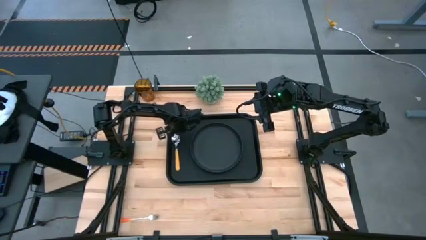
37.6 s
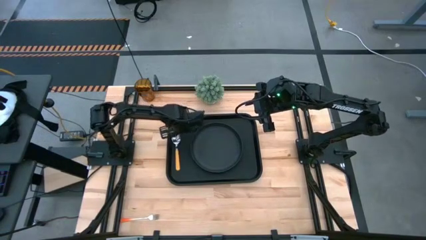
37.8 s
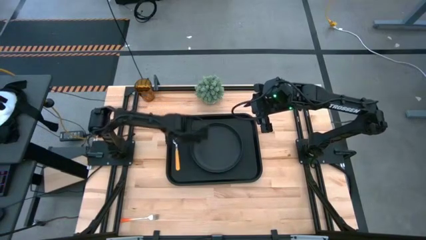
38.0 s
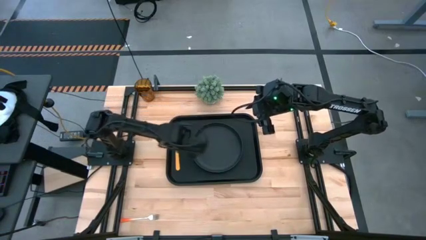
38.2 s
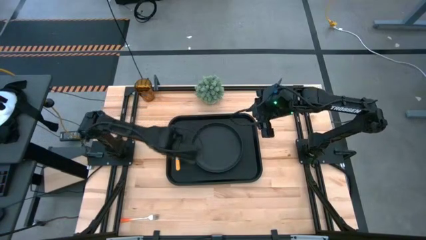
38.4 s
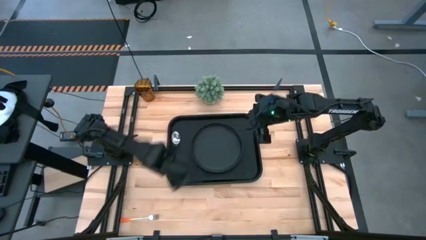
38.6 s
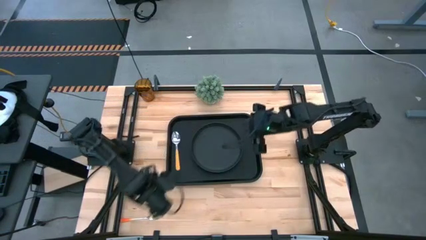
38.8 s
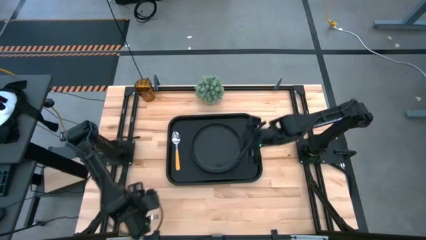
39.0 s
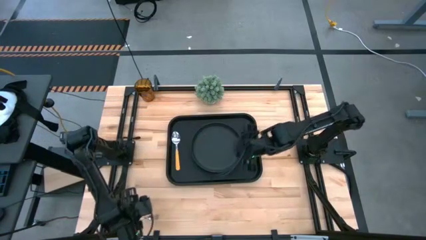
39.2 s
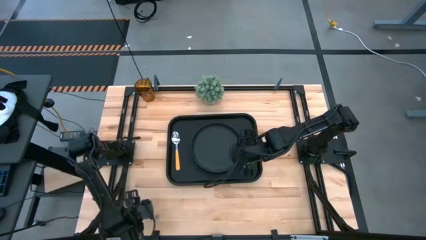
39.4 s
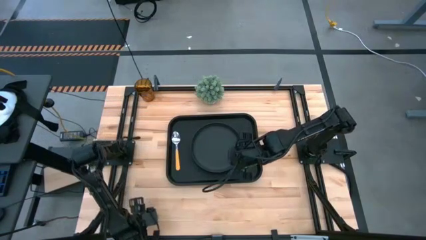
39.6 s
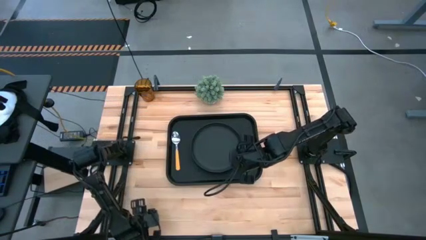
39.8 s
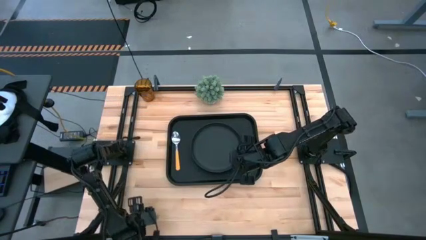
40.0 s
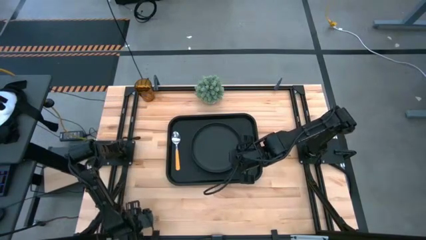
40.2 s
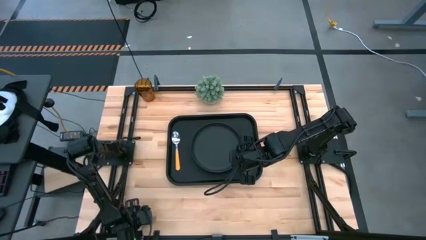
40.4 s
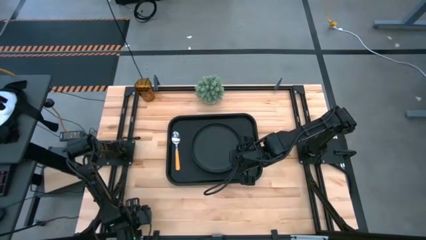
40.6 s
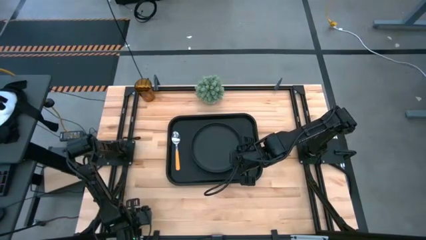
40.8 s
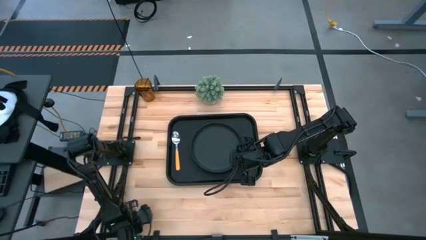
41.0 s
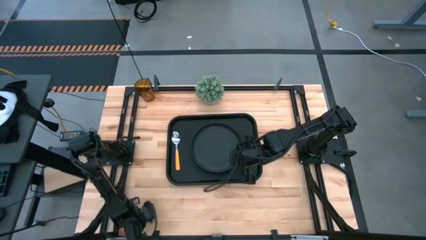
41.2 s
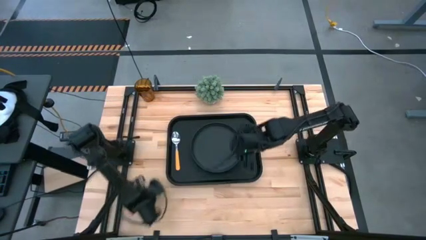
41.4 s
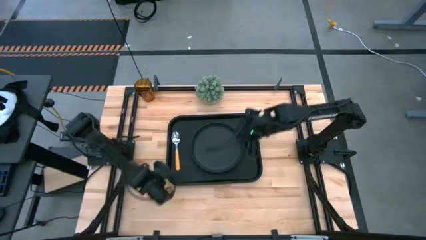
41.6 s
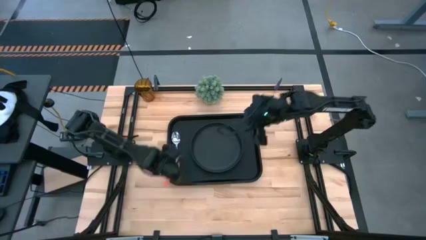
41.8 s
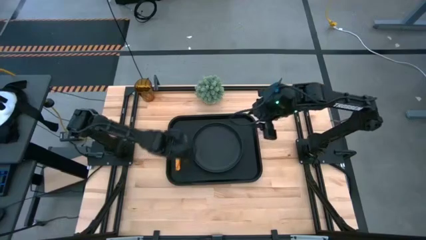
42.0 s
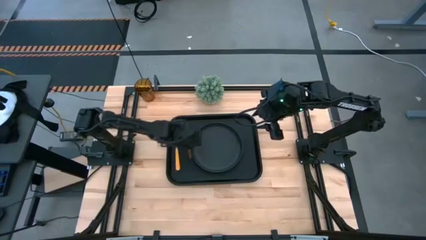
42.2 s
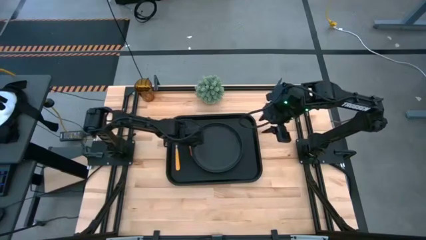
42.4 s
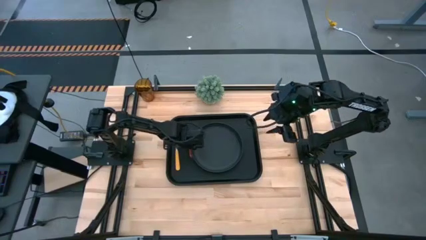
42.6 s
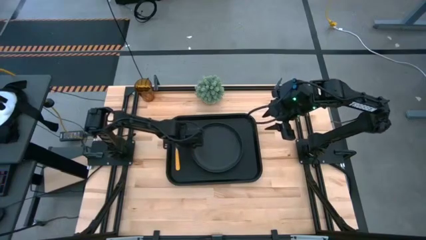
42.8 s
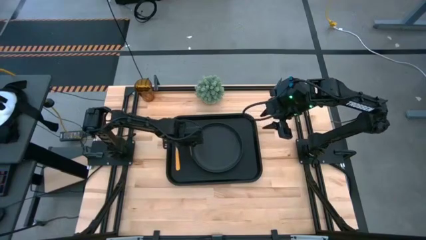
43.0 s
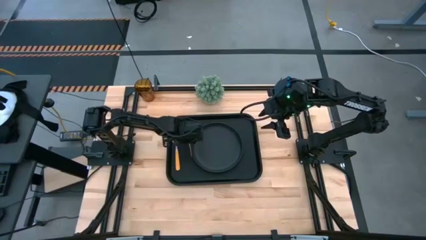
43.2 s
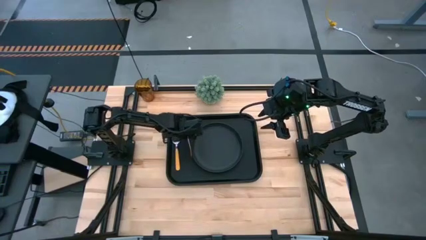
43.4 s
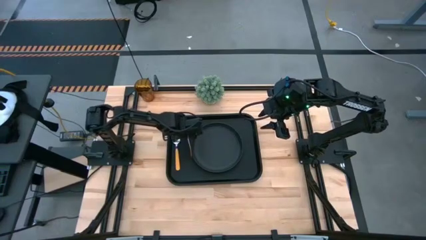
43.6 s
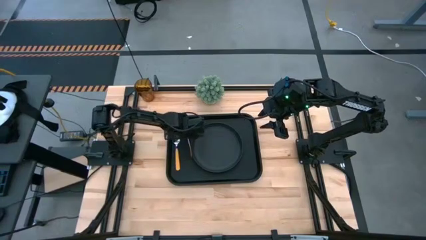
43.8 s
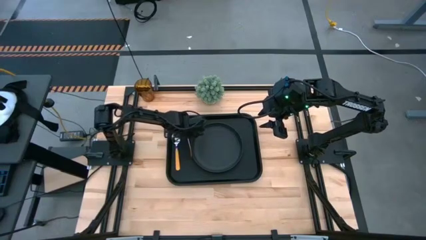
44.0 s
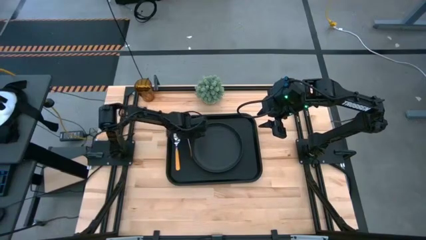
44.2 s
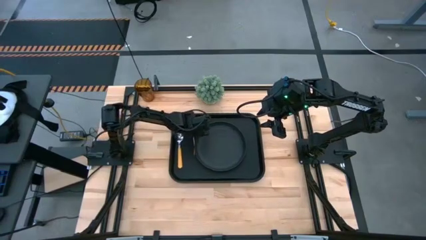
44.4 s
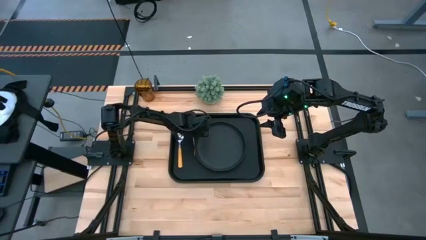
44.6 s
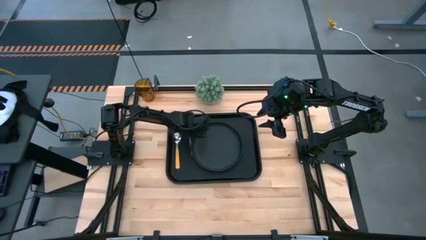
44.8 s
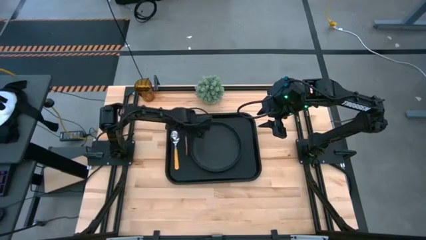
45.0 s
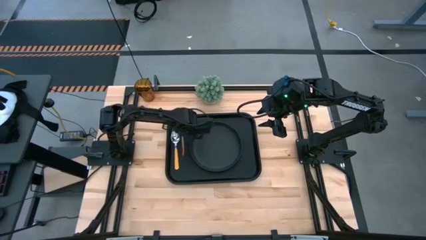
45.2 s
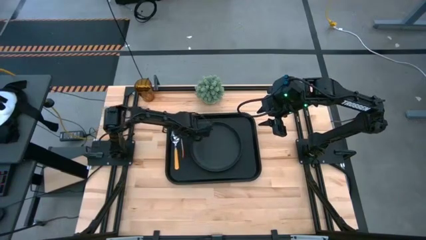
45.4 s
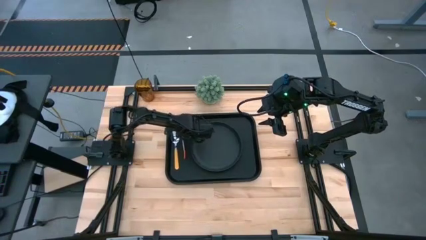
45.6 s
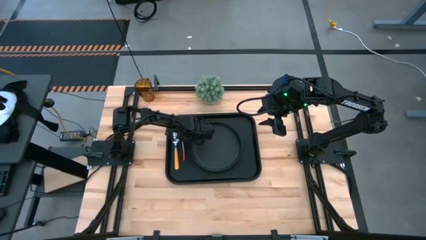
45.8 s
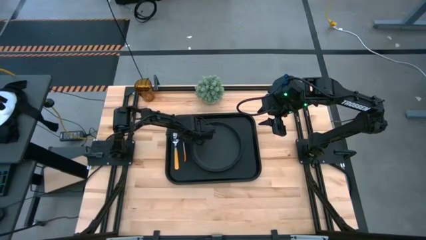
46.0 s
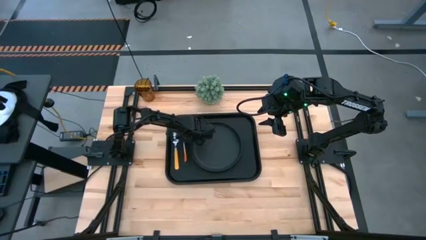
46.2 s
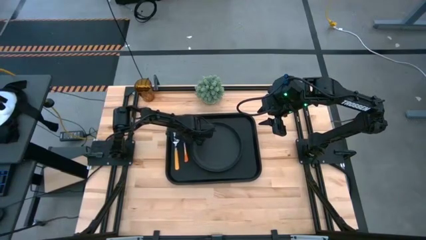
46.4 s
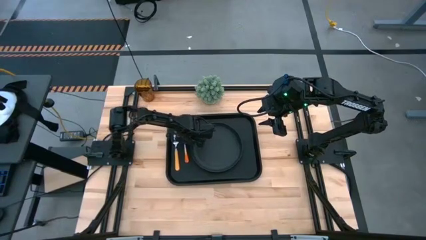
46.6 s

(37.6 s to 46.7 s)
Task: Pick and place plate/cup/fork/spoon on tray
Put the orange fork on the black serving tray to the right of the black plate

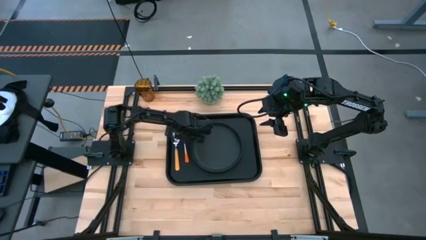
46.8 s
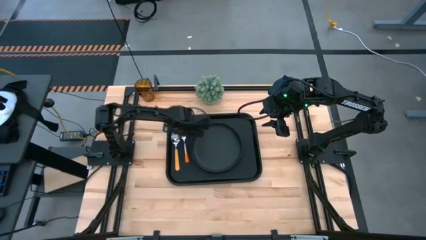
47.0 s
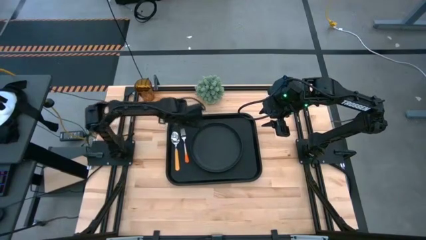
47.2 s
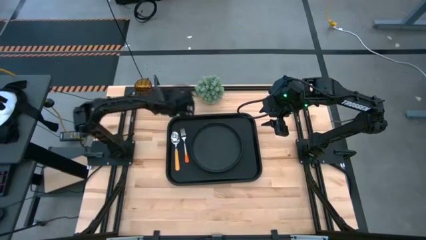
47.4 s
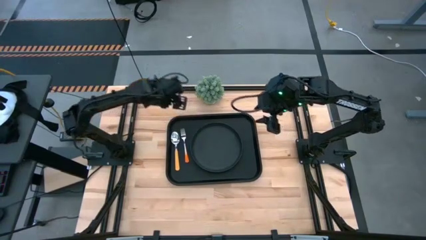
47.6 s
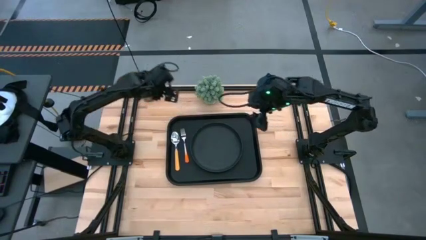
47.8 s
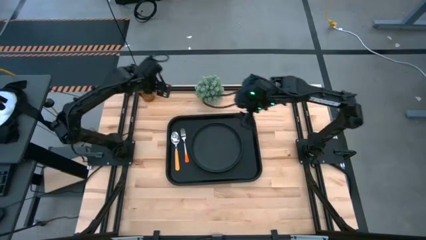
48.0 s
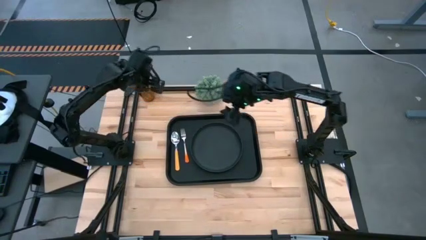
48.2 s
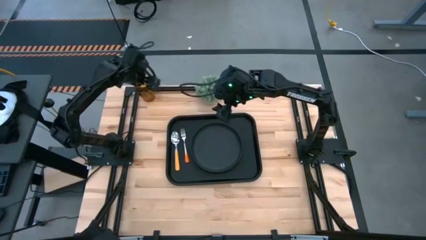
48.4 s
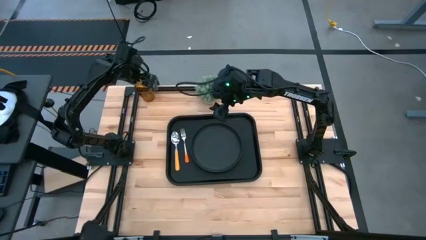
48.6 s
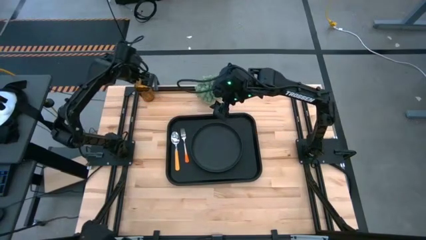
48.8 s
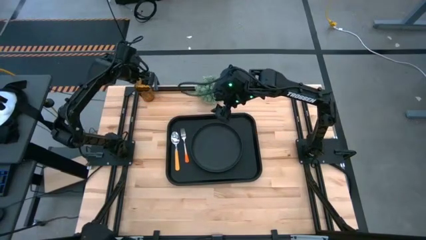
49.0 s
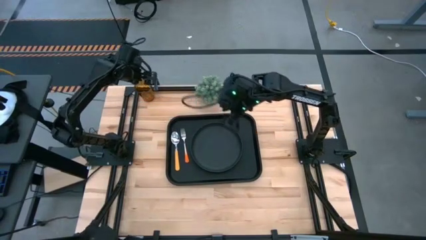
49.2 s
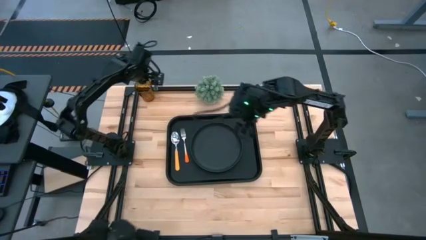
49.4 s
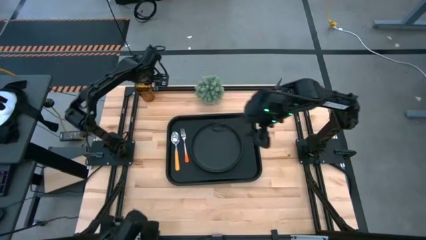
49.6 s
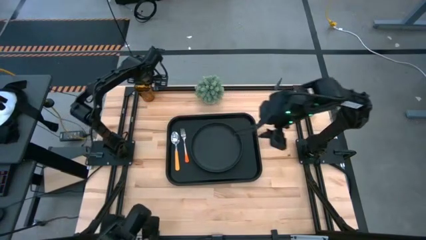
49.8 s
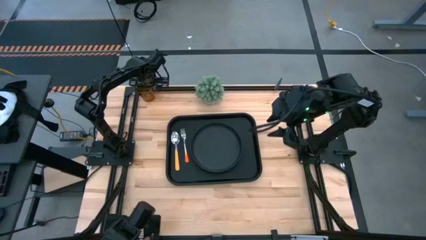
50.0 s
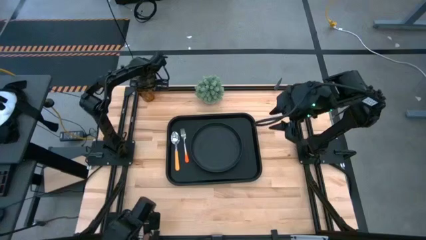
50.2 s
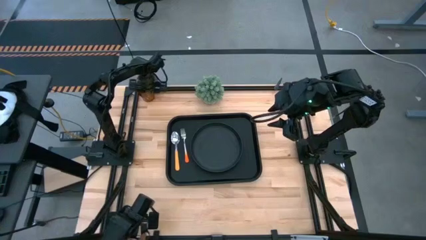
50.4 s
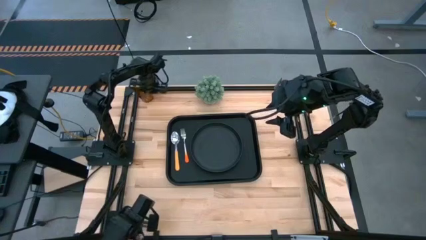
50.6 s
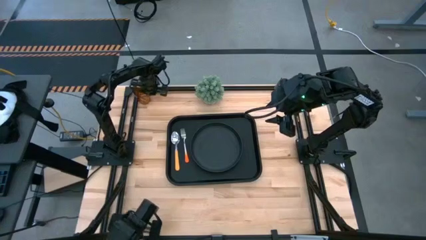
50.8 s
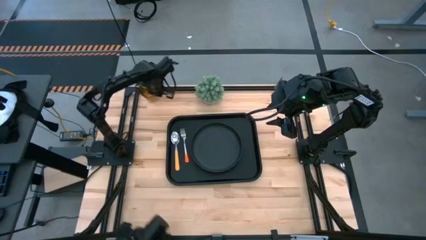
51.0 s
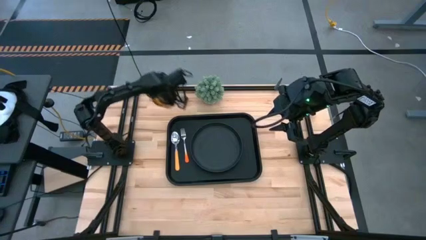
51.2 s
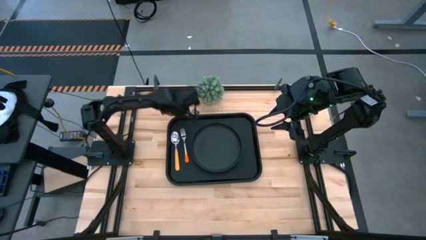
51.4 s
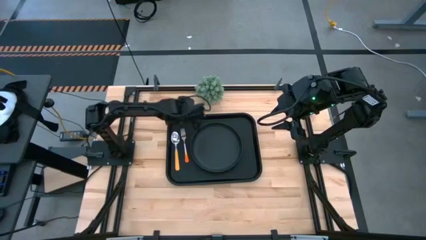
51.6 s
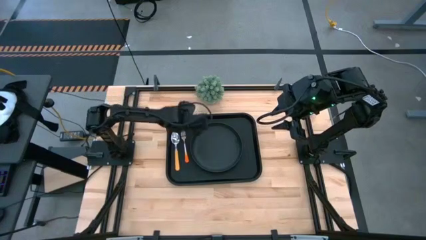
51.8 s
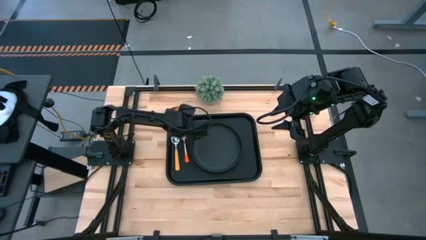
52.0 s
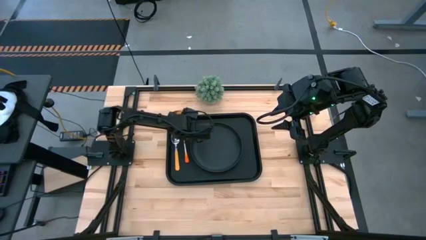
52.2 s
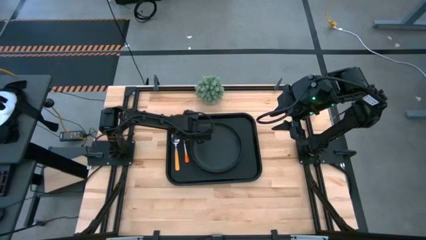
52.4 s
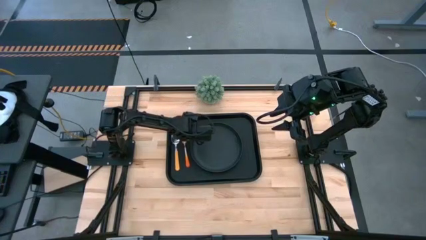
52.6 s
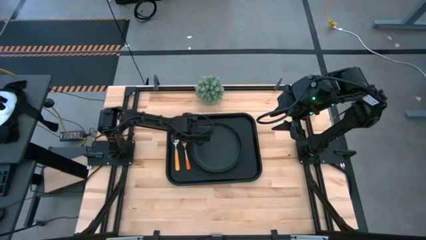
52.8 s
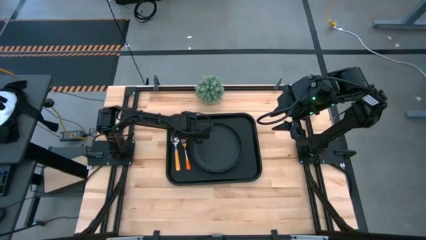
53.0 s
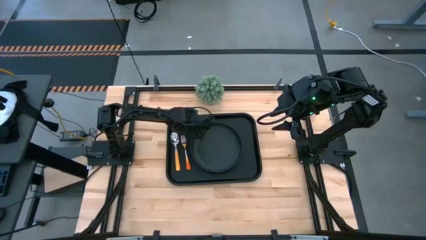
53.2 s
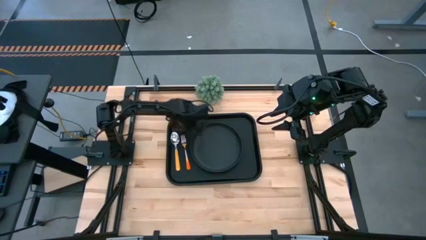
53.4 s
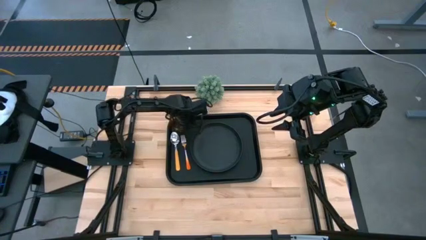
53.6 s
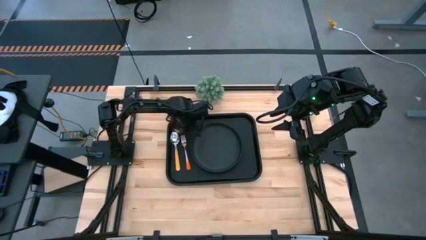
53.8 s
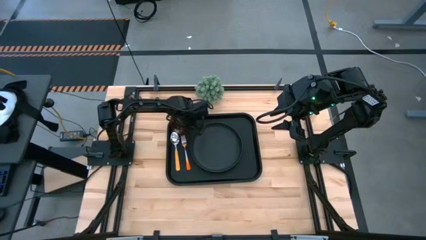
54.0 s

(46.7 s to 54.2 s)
Put the orange glass on the black serving tray to the top left of the black plate
